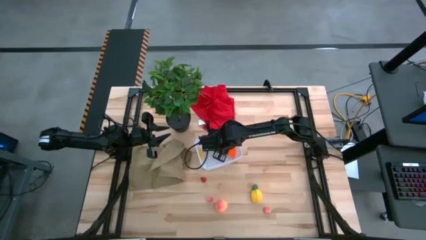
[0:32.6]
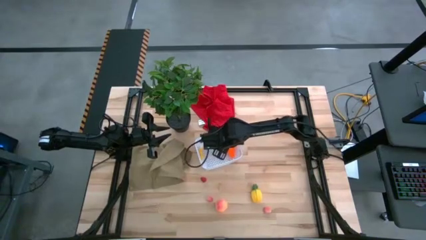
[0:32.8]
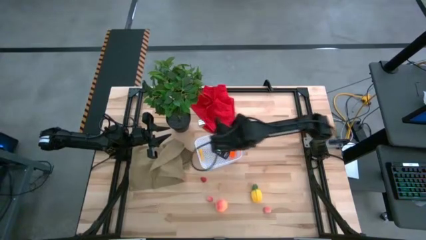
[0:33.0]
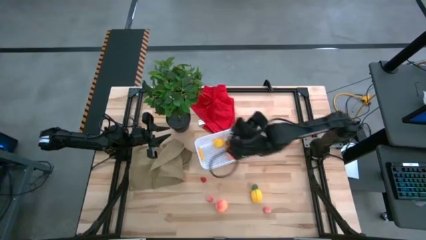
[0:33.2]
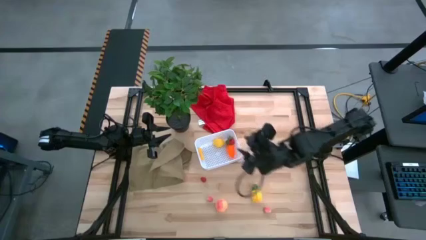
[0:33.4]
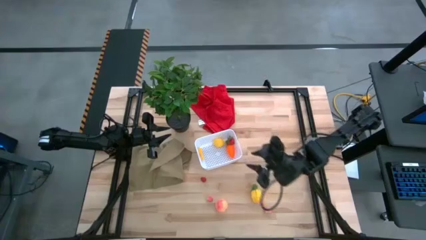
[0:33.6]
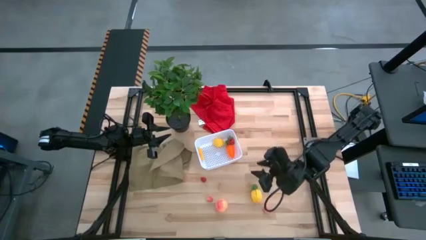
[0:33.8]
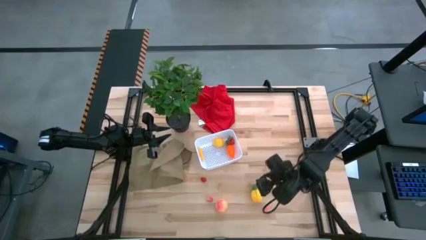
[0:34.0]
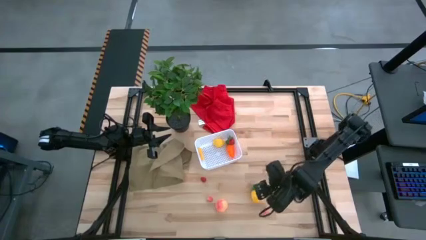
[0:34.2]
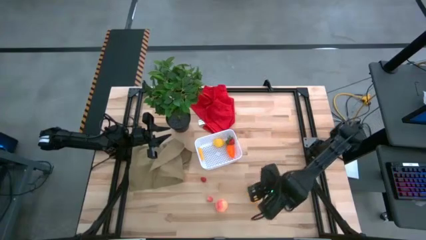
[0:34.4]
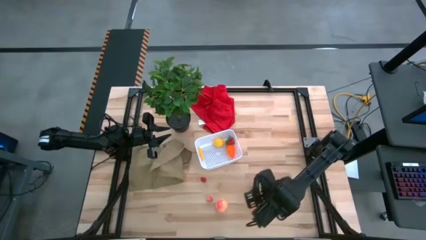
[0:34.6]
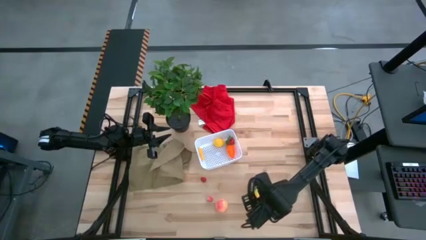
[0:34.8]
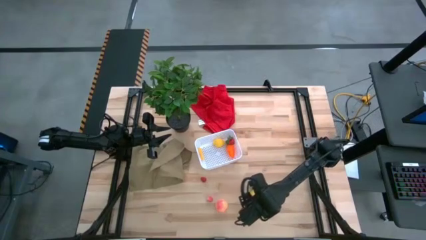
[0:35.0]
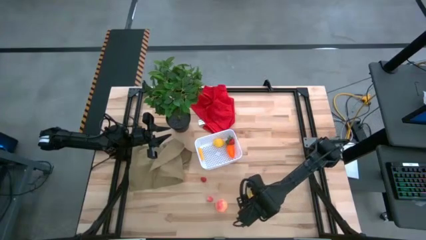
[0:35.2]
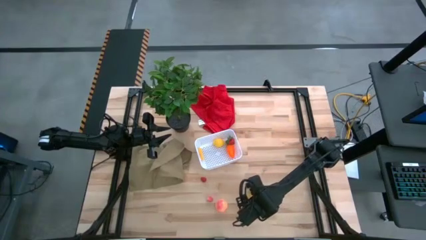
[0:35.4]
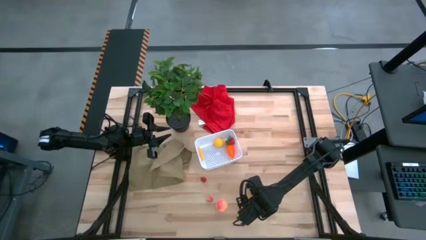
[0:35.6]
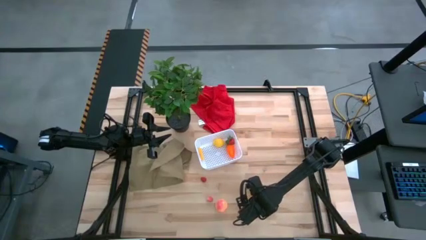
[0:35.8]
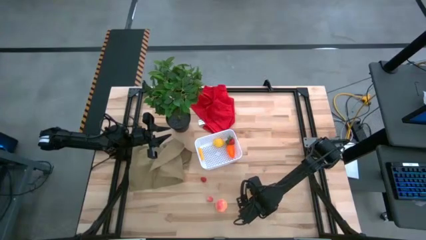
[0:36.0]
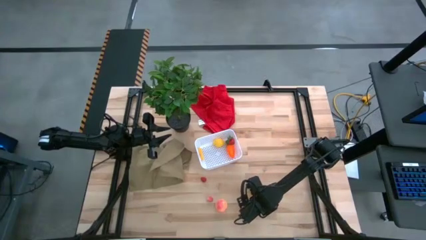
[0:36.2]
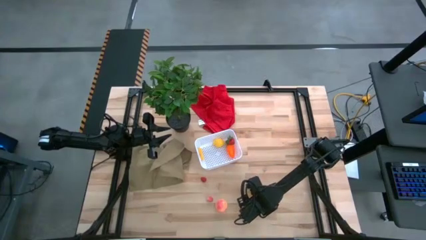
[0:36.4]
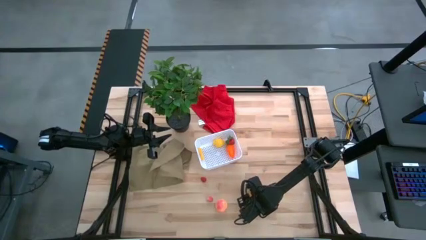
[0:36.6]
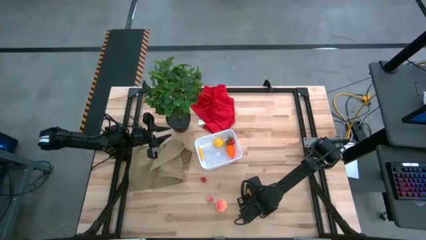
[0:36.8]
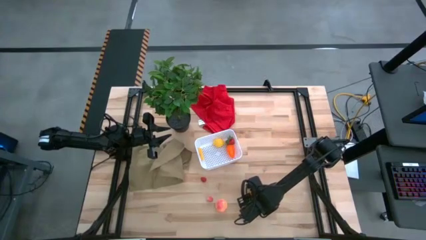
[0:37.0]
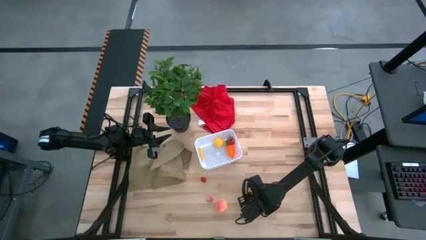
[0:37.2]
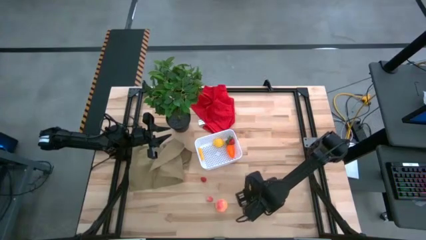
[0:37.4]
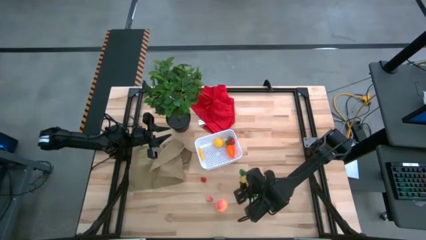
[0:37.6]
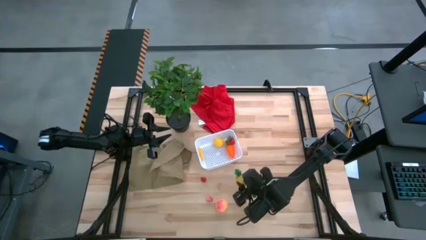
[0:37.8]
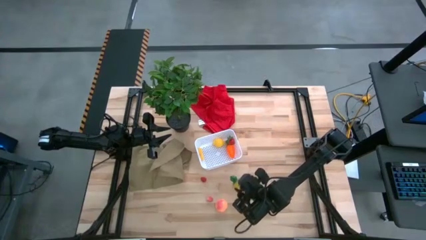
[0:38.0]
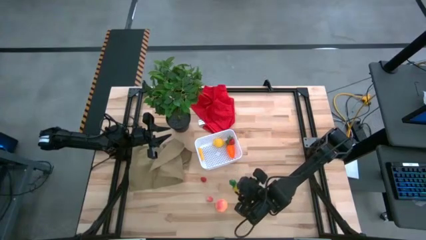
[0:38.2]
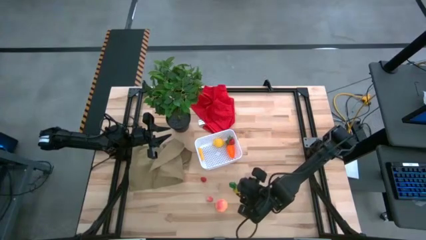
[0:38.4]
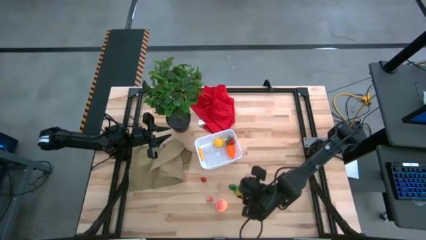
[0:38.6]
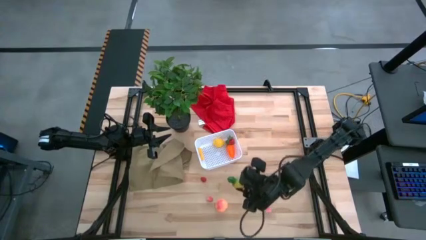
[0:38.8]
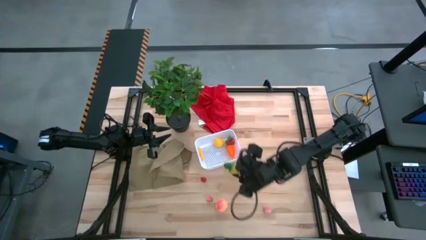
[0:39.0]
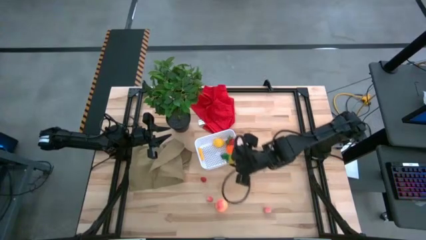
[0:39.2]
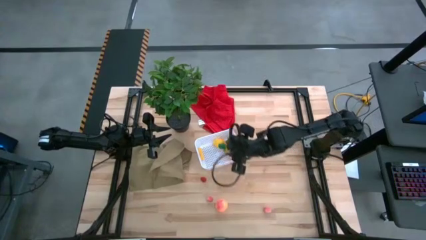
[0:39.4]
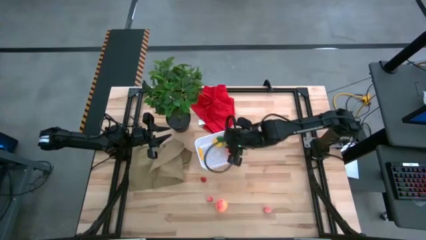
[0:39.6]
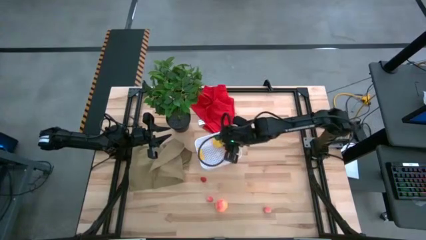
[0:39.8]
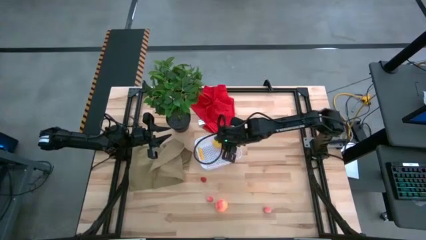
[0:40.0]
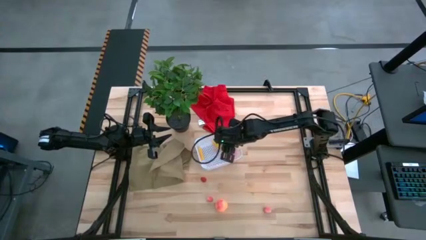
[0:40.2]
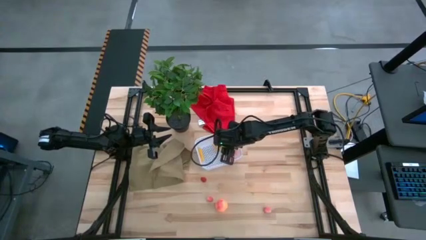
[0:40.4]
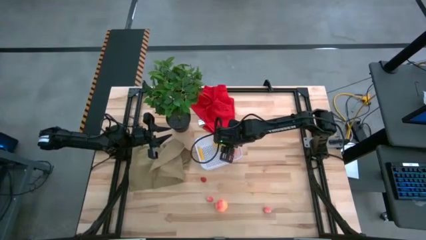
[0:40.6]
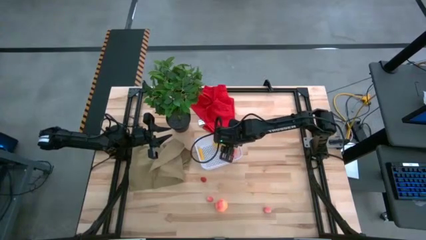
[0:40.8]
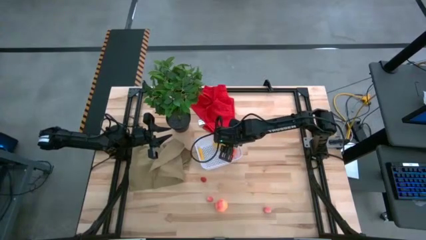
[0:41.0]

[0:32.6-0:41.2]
Task: Pick and placing Produce into tupperware
Put the yellow pineapple into the bin

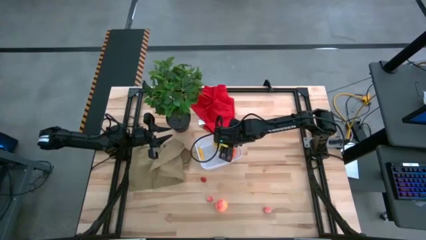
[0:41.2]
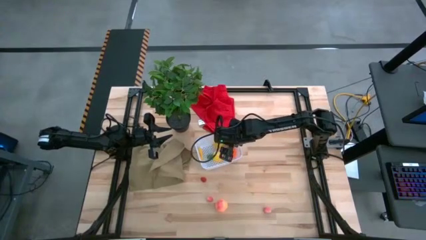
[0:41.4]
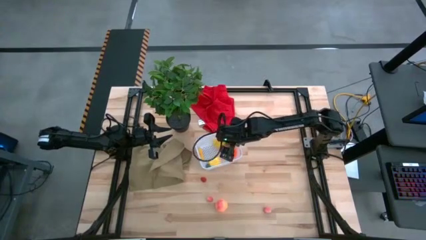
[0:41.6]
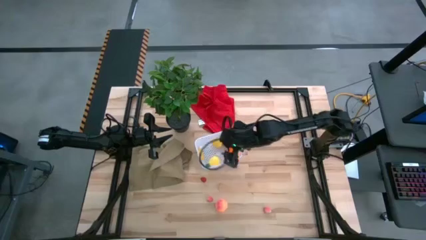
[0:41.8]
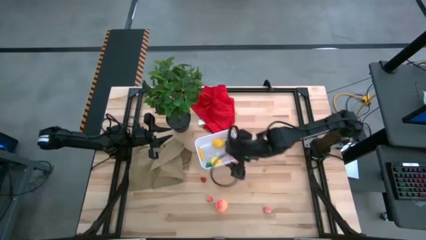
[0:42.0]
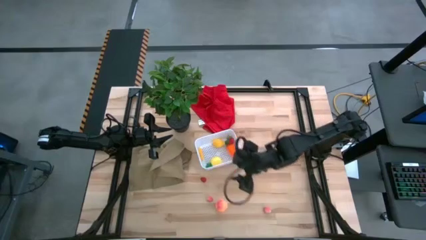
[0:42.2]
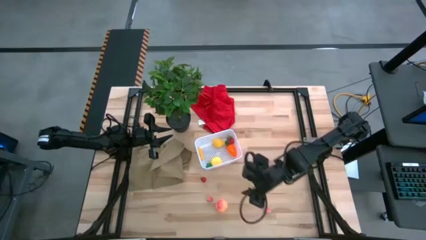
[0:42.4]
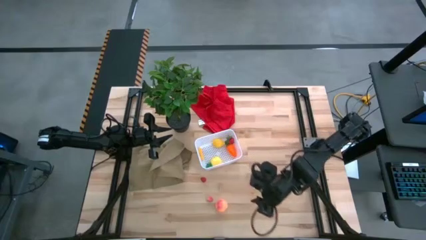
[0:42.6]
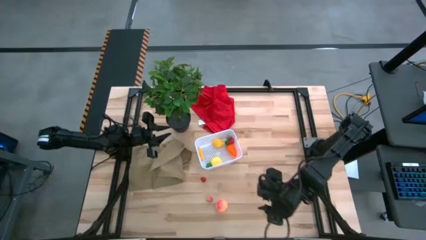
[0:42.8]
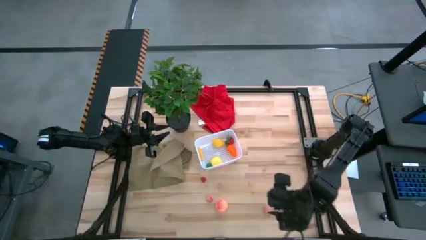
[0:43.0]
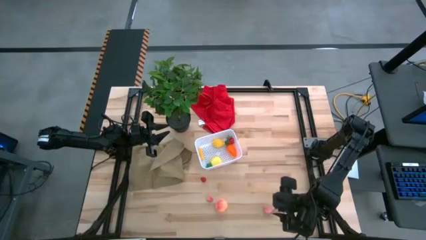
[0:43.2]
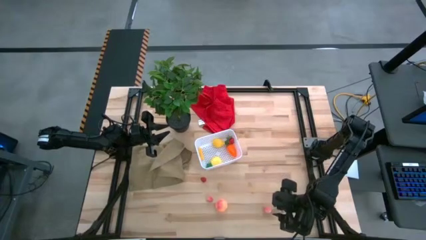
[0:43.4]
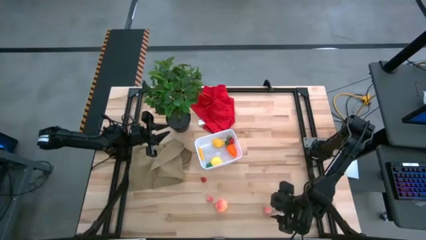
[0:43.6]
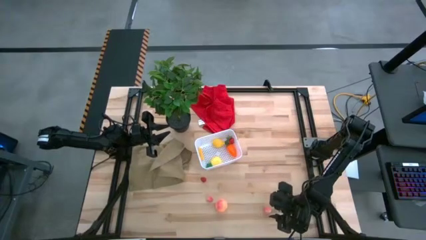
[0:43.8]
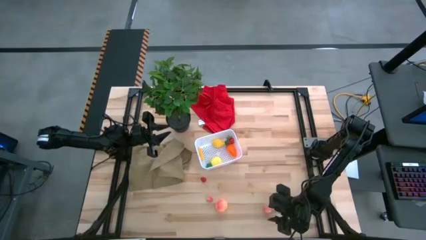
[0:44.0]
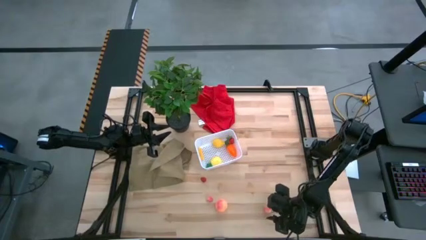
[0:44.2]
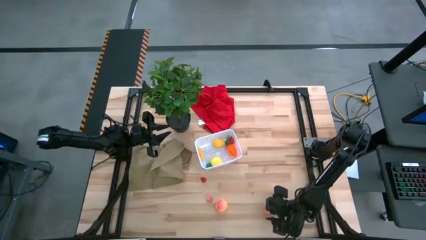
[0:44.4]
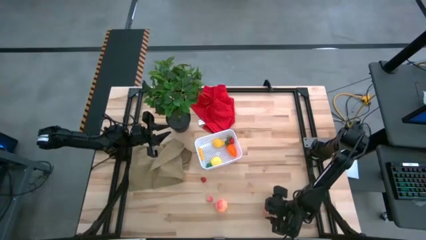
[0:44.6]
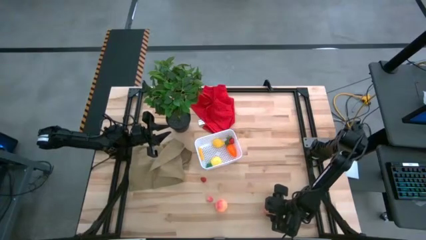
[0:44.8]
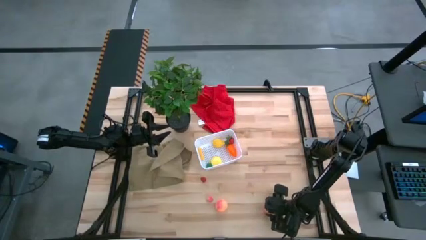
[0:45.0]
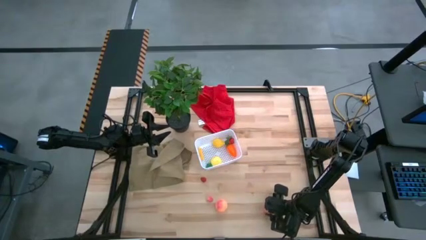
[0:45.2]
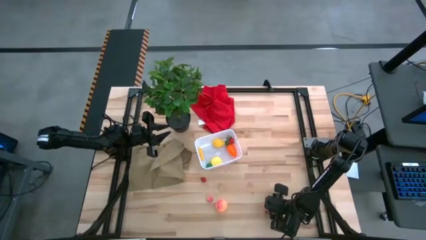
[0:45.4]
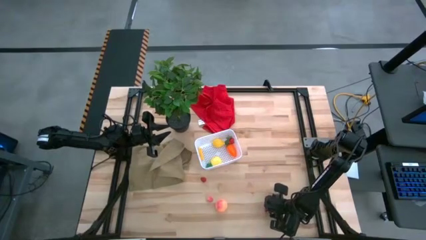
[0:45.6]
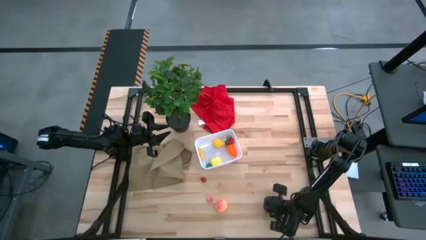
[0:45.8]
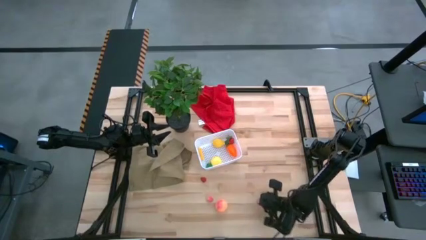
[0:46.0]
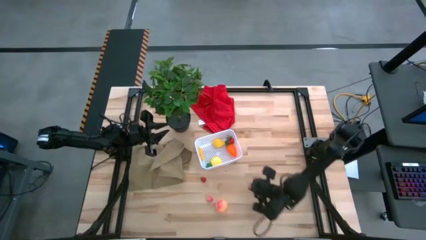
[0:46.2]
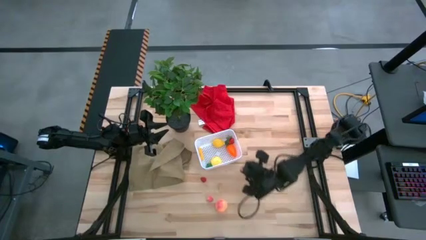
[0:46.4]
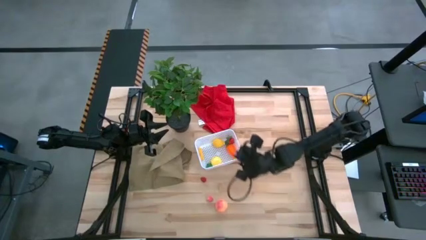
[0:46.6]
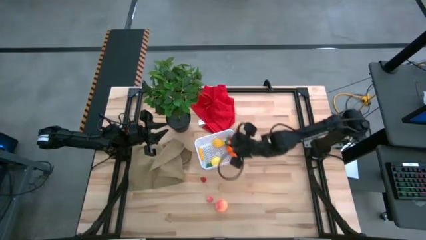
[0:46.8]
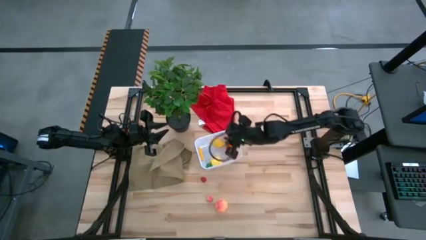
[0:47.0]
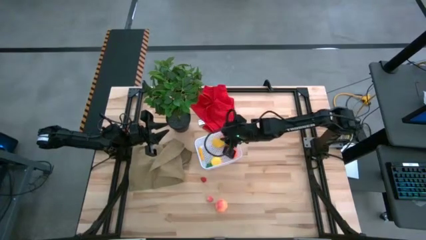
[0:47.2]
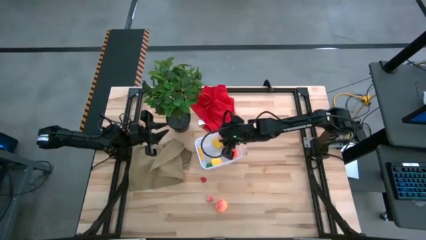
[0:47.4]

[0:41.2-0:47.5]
Put the right orange apricot into the bin

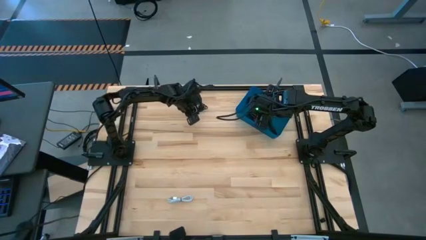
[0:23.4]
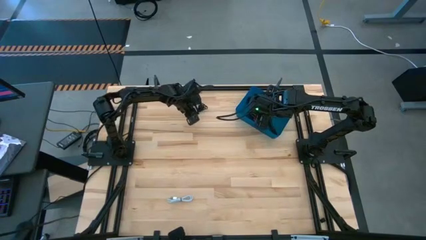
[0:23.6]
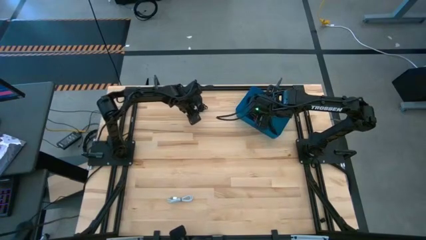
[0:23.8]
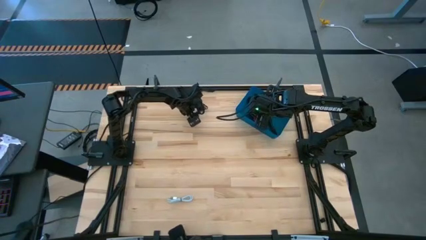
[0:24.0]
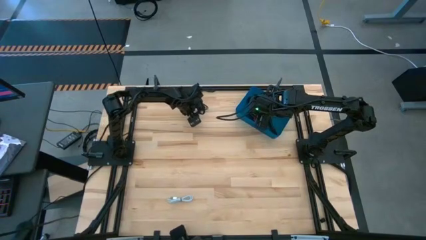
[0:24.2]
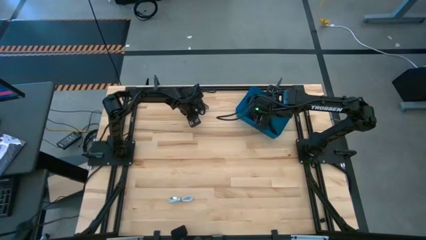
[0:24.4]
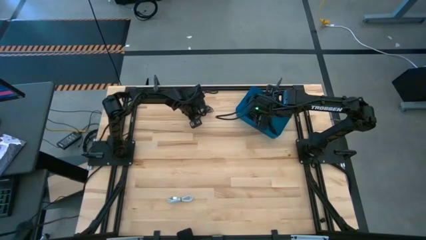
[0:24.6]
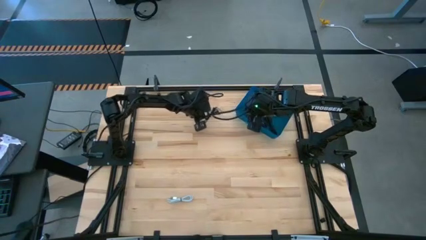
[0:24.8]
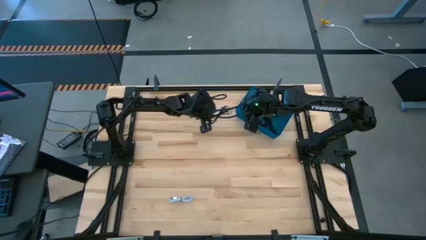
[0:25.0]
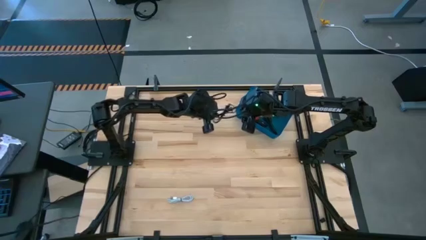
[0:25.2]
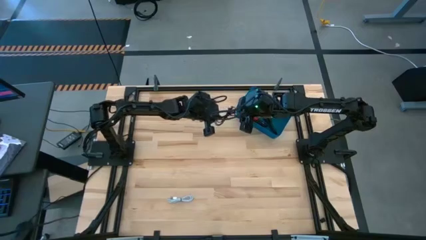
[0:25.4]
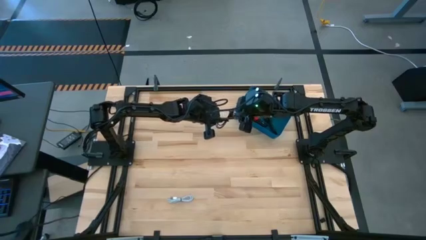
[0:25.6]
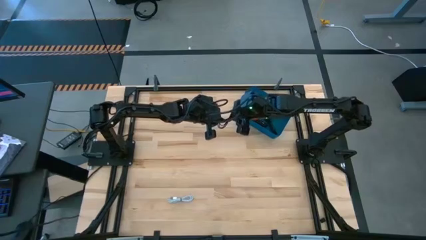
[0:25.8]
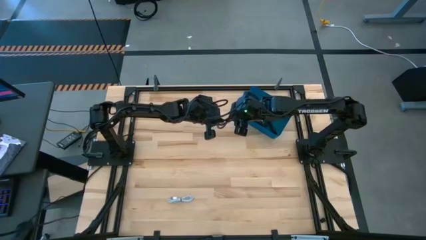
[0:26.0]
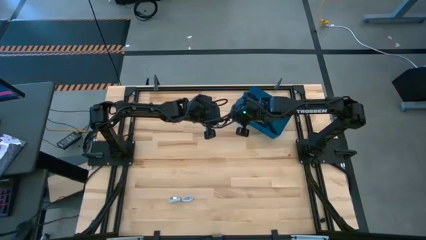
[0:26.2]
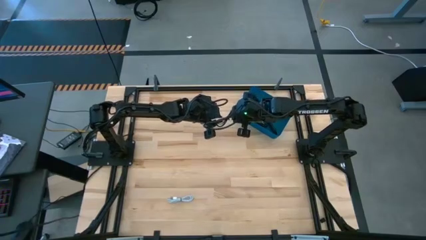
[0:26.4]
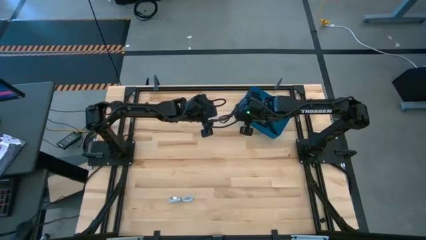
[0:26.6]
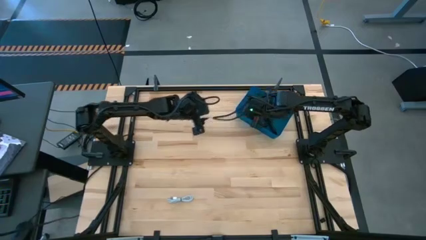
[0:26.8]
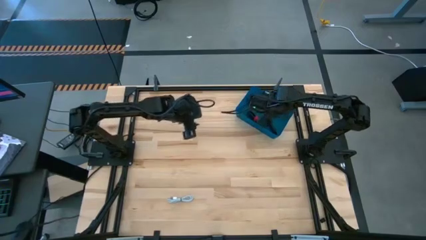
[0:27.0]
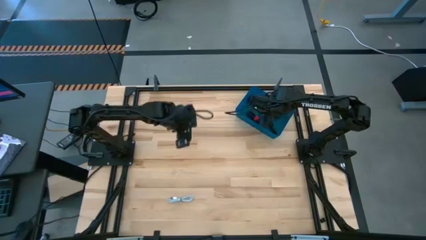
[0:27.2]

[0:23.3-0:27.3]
Task: Pick and place USB-C Cables
Put the black charger cable into the bin
